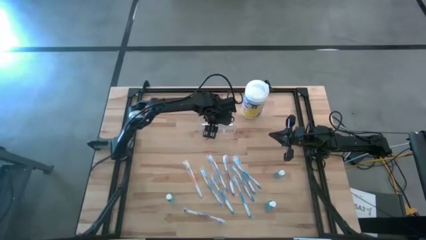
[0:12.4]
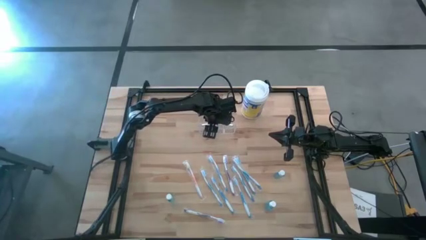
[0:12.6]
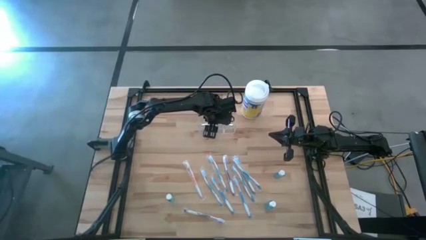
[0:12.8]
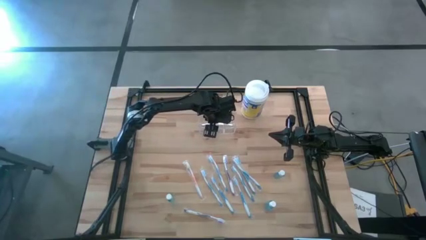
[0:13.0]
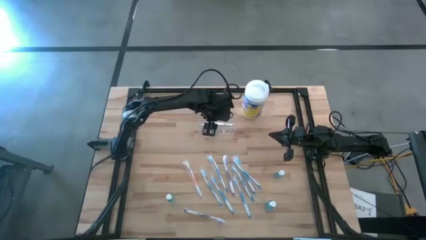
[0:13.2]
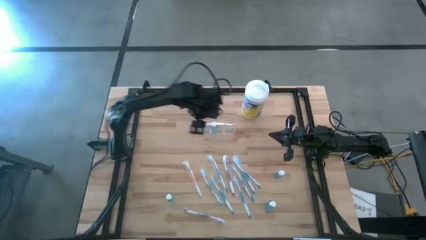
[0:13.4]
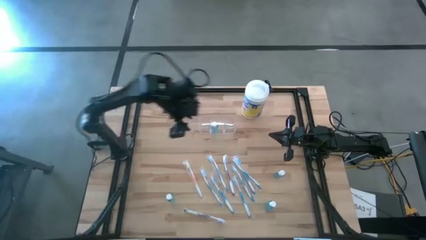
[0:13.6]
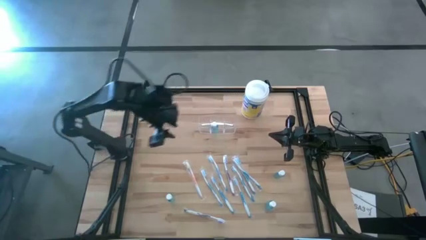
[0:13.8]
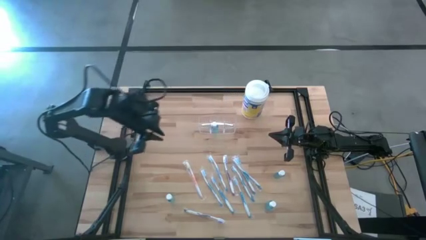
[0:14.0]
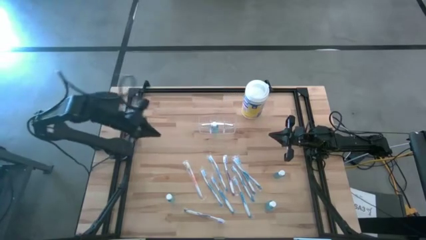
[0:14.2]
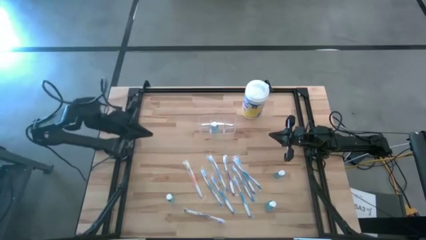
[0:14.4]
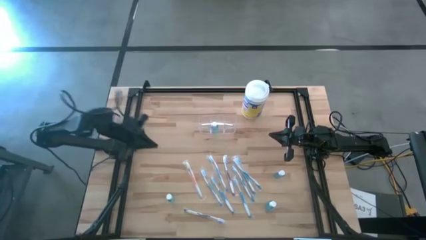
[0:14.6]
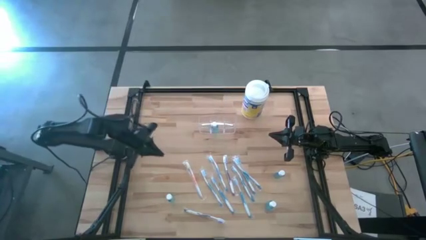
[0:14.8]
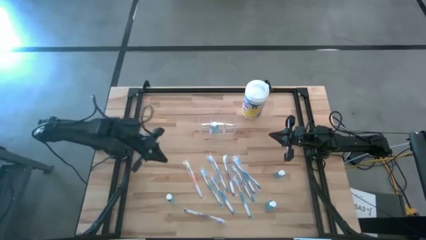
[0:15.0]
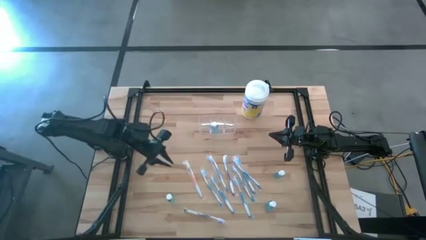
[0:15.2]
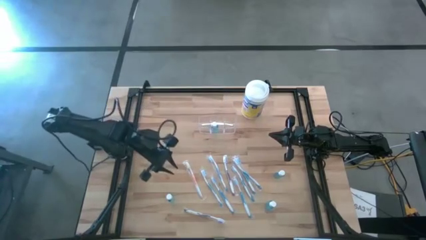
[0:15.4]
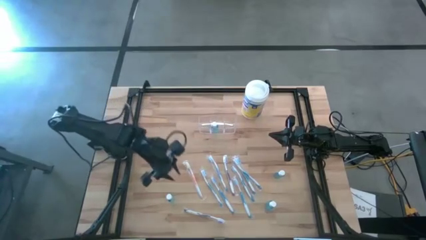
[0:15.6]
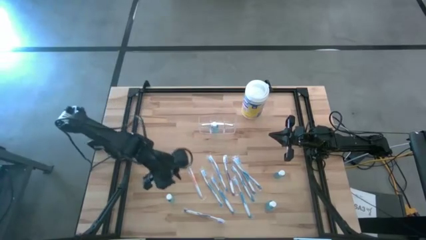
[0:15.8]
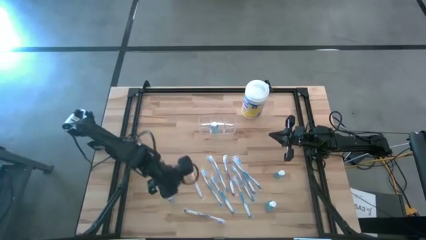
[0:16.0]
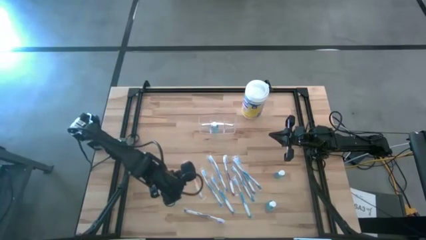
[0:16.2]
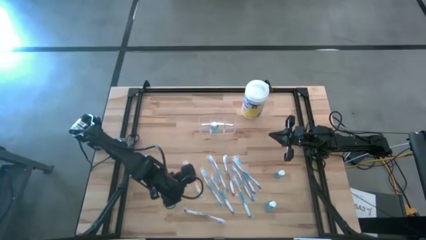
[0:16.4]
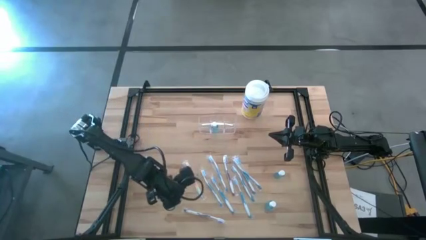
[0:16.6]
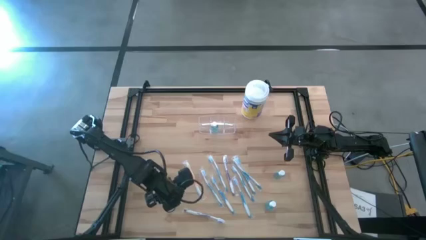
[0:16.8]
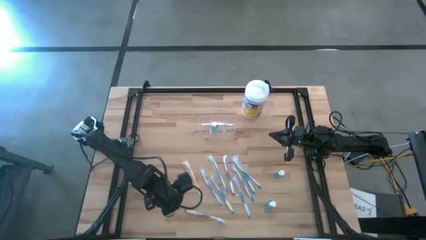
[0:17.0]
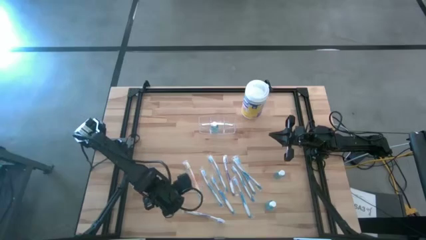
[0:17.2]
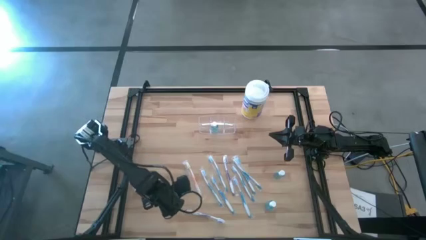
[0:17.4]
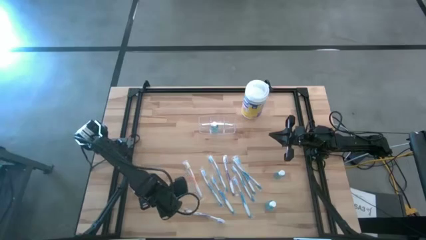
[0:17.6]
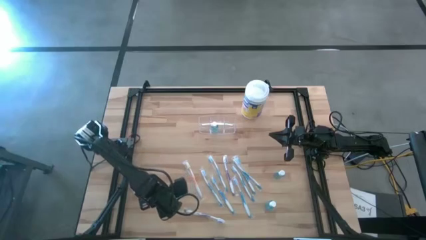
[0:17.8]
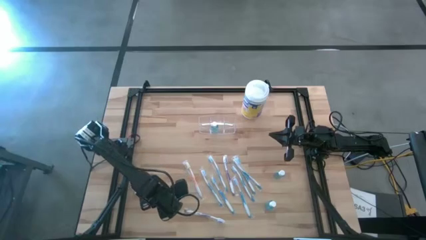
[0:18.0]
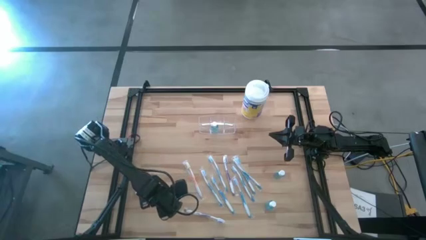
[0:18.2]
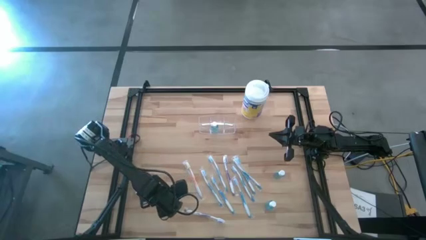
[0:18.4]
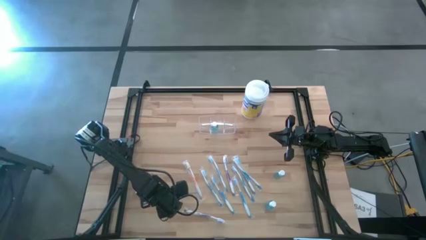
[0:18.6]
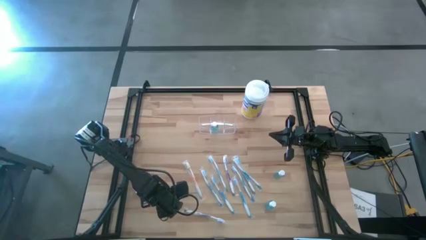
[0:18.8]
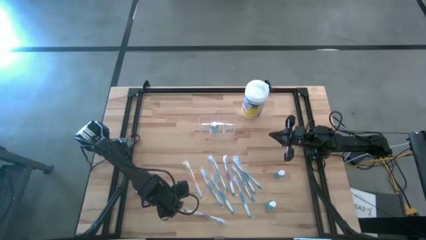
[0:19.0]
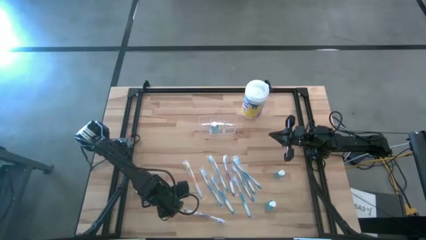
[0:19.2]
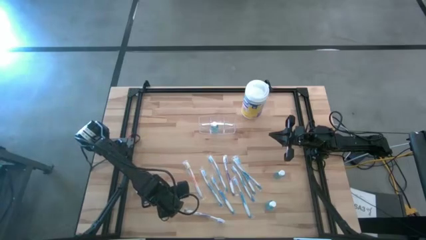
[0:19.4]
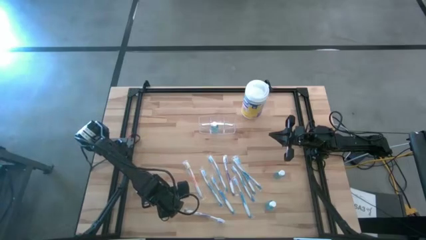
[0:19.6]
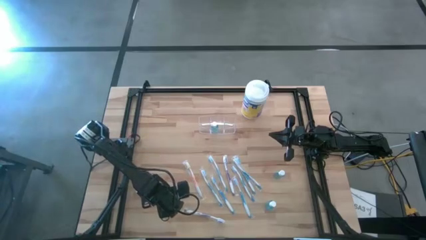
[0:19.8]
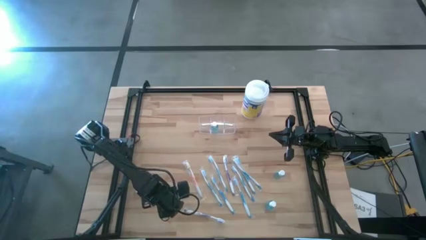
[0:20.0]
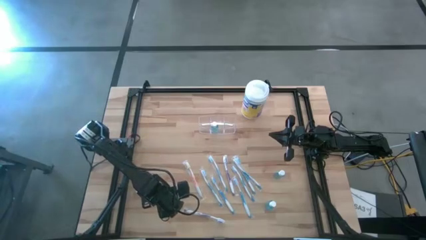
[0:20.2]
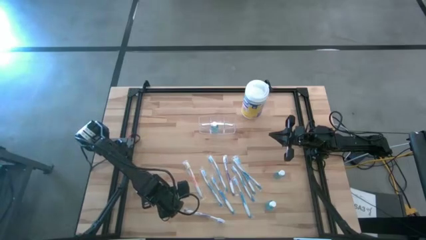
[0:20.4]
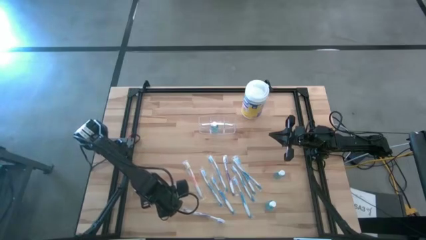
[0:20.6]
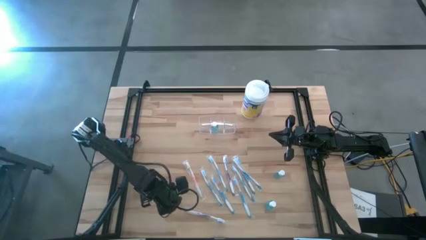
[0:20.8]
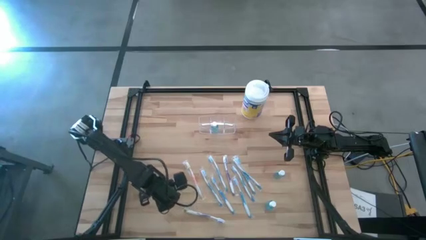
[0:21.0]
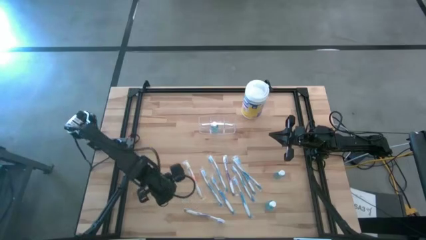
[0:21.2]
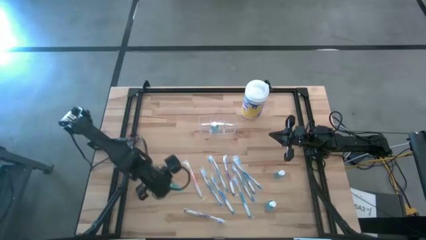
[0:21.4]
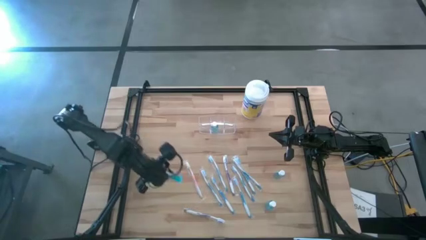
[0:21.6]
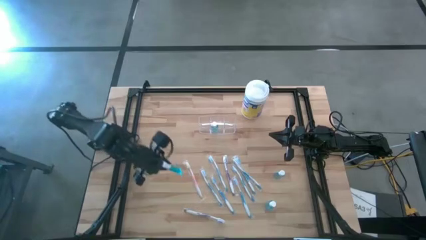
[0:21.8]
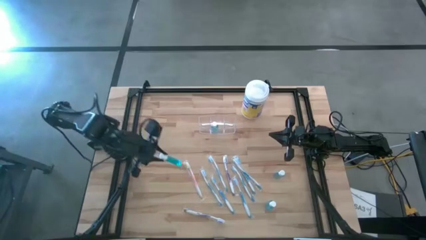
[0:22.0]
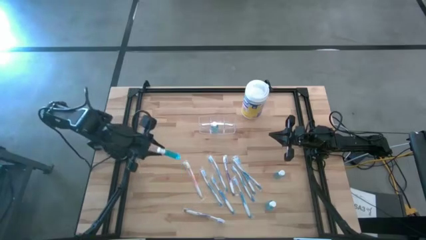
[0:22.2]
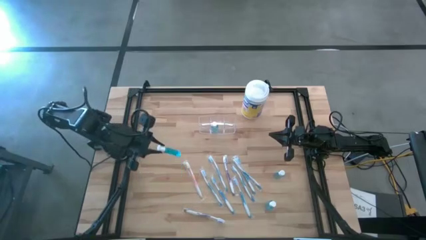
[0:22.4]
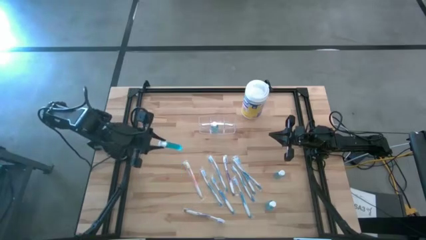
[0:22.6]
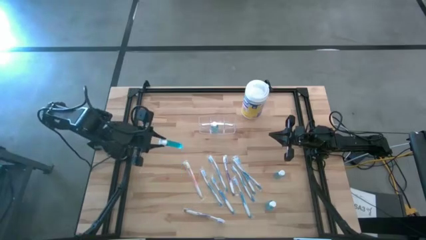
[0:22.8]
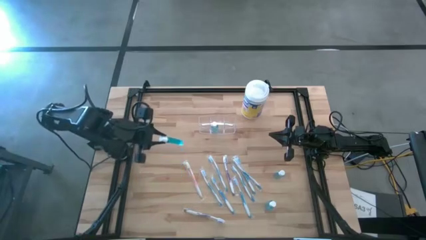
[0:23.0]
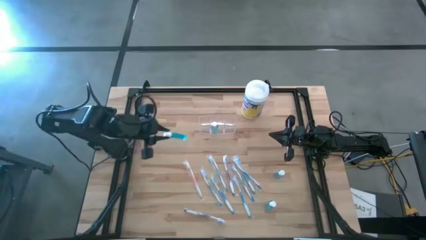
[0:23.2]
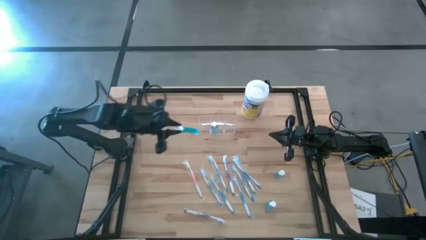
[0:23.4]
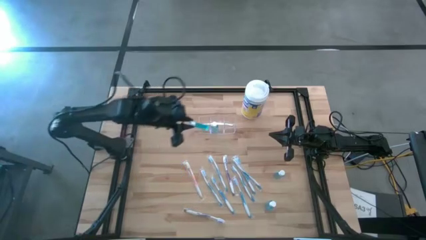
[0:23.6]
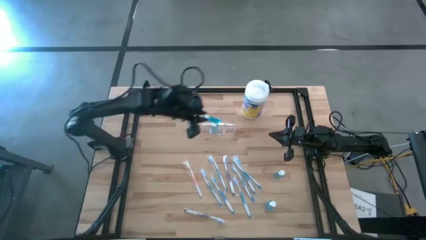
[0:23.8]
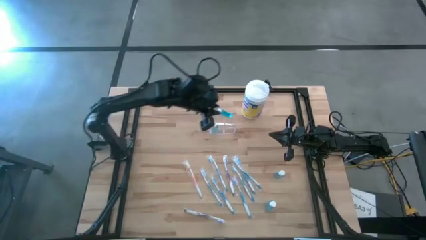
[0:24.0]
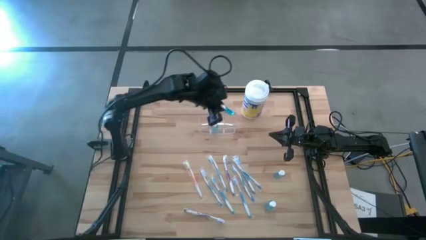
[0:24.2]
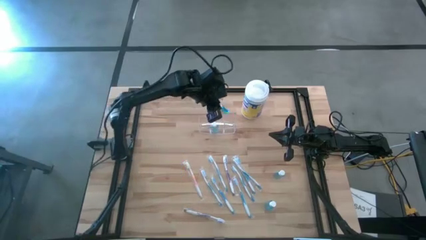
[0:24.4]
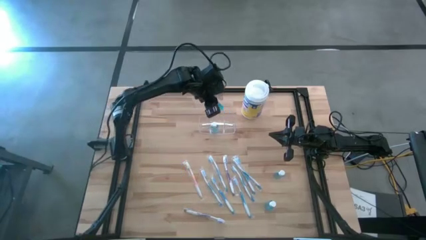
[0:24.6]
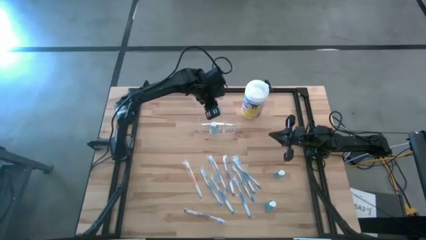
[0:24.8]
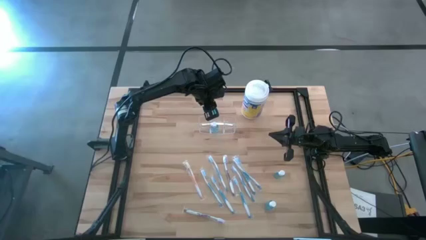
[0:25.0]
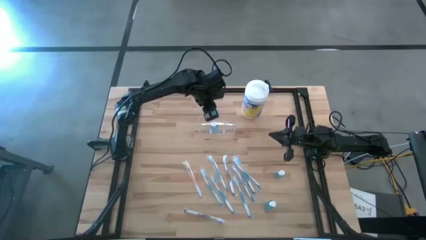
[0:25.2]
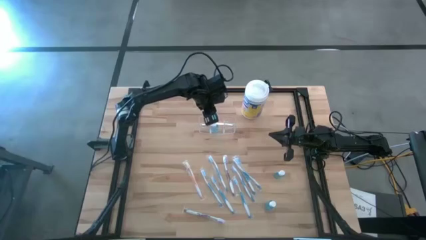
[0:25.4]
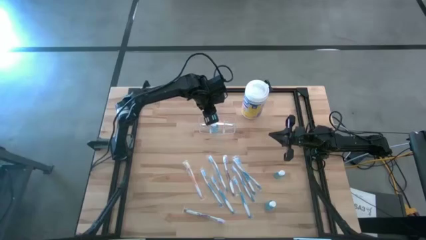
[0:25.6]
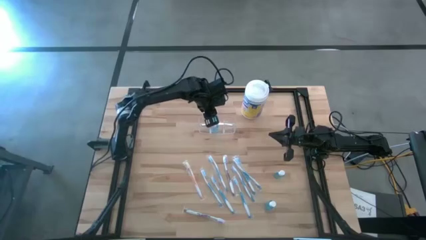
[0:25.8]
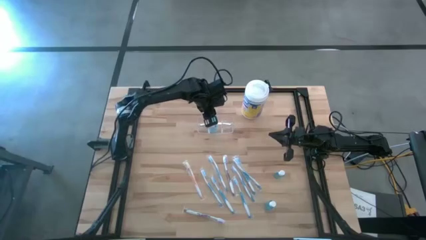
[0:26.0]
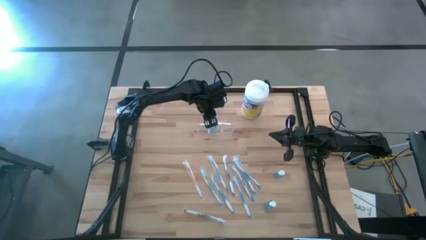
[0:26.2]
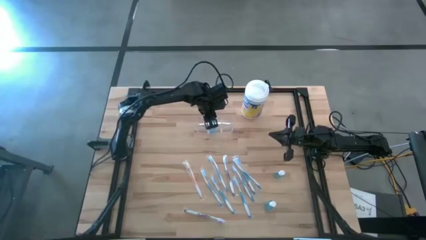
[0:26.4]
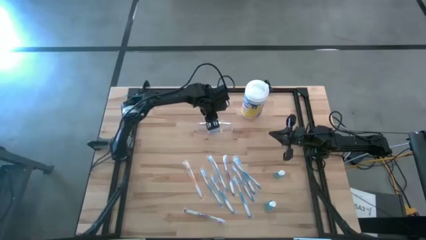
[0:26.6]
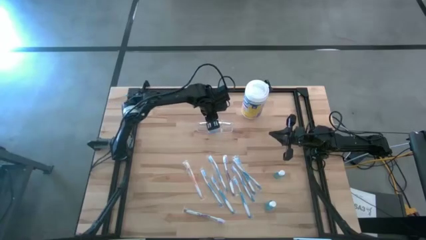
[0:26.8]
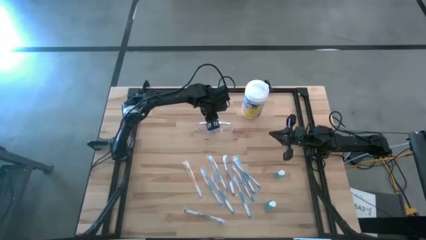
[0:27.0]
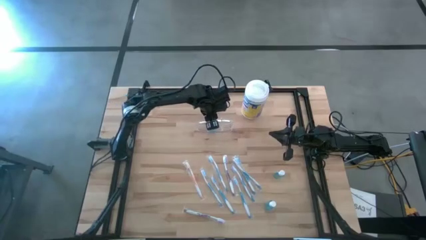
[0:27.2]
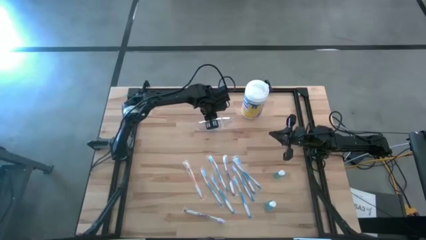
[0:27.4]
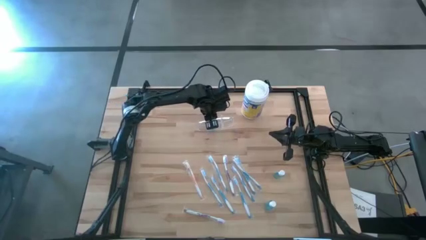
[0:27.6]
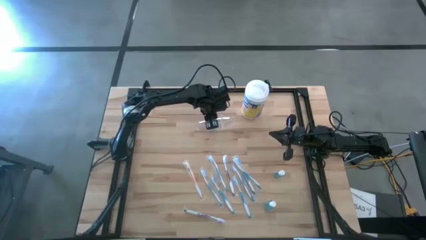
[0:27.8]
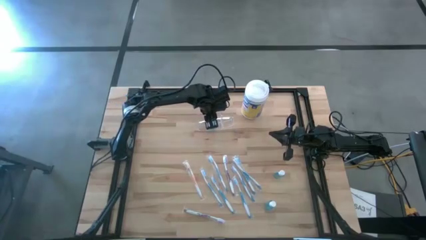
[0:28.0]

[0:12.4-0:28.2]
Task: Pick & Place toothbrushing station
Put the blue mouthwash bottle into the transparent toothbrush holder
